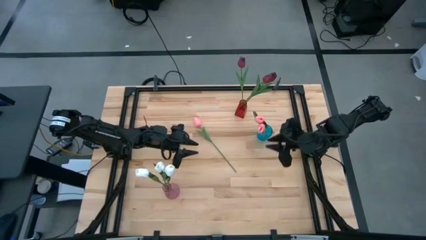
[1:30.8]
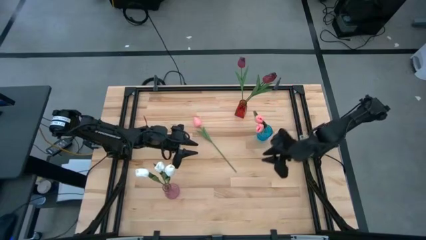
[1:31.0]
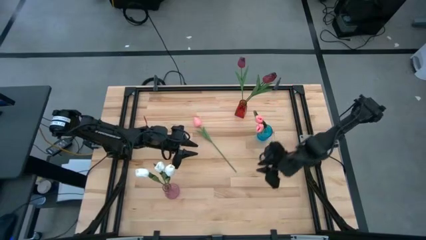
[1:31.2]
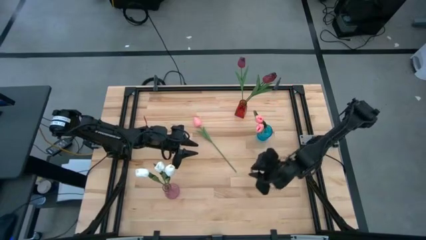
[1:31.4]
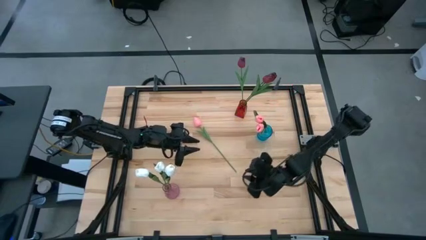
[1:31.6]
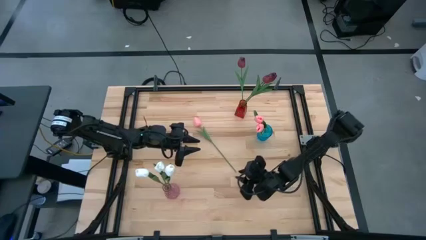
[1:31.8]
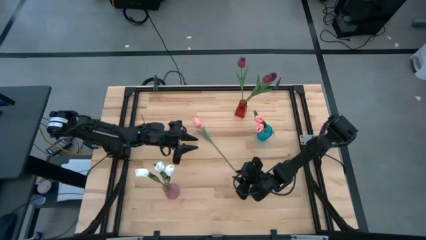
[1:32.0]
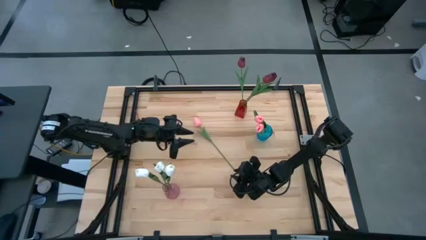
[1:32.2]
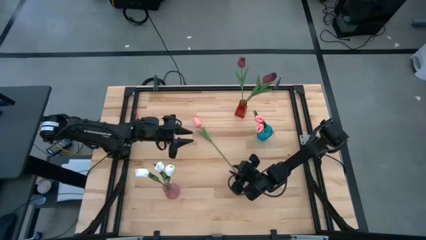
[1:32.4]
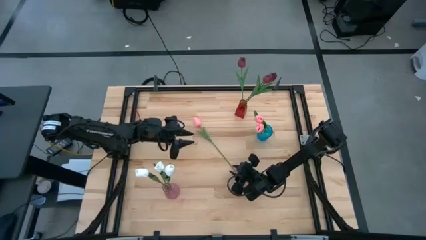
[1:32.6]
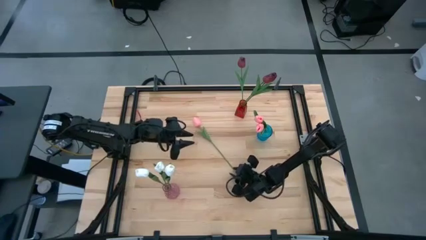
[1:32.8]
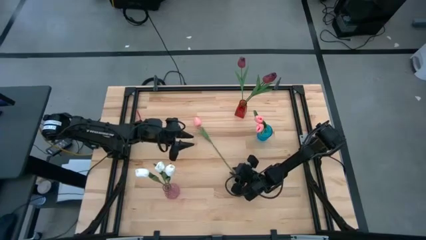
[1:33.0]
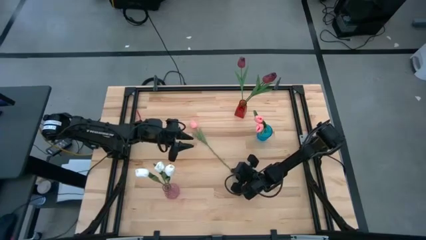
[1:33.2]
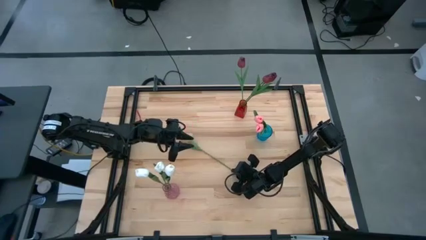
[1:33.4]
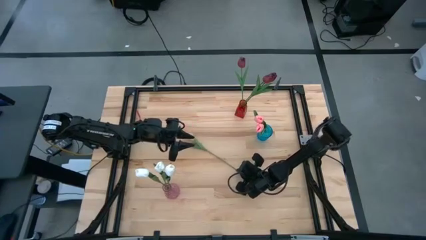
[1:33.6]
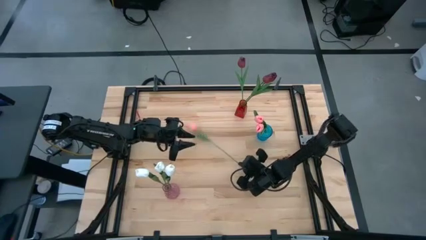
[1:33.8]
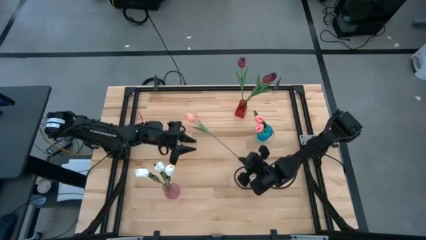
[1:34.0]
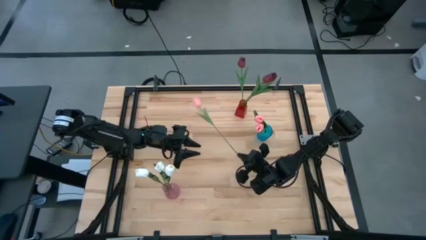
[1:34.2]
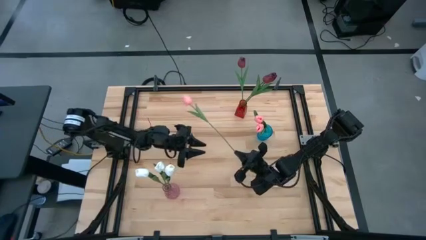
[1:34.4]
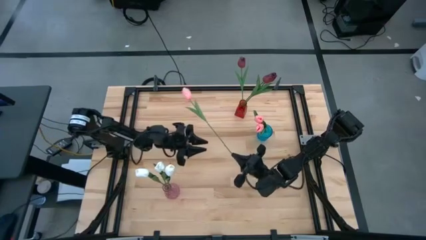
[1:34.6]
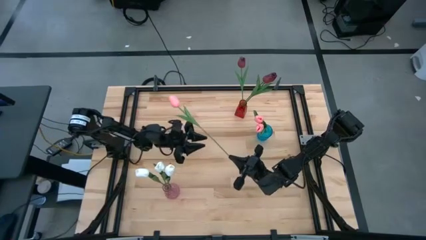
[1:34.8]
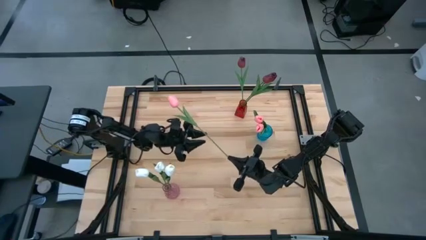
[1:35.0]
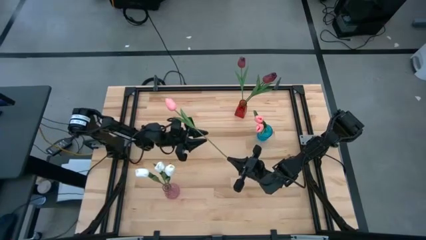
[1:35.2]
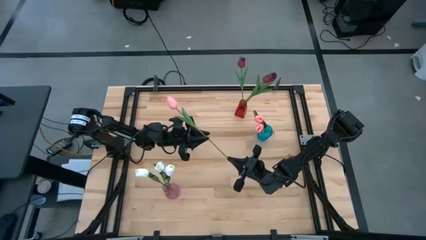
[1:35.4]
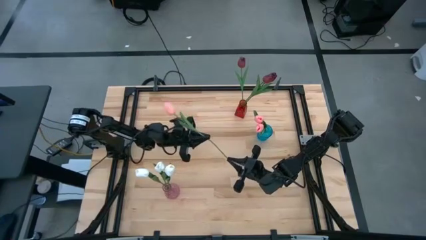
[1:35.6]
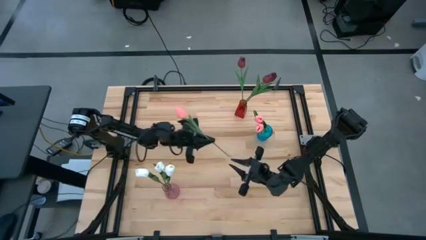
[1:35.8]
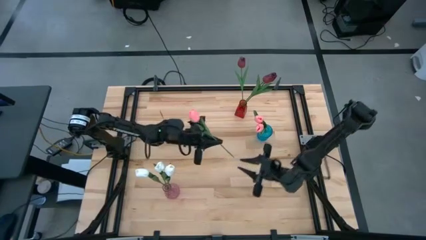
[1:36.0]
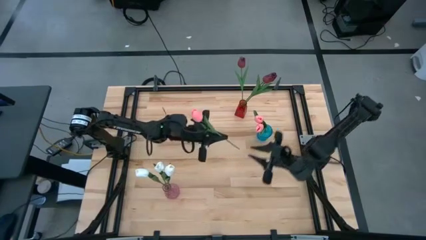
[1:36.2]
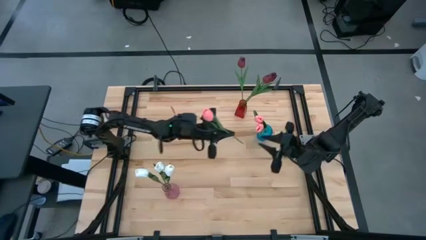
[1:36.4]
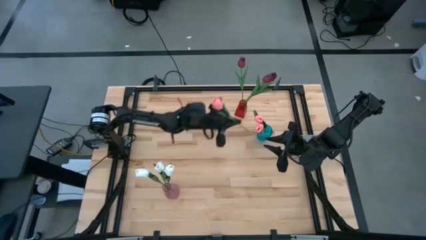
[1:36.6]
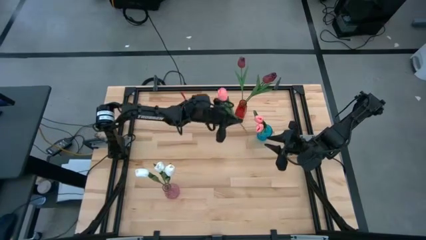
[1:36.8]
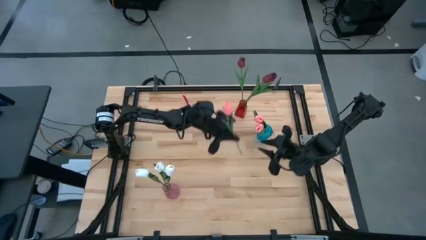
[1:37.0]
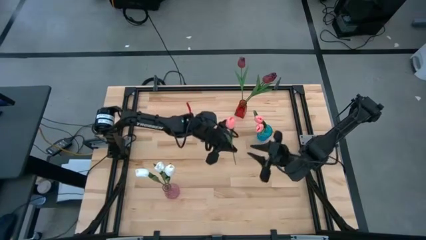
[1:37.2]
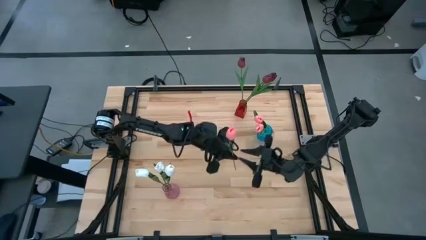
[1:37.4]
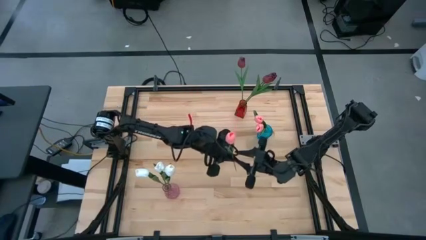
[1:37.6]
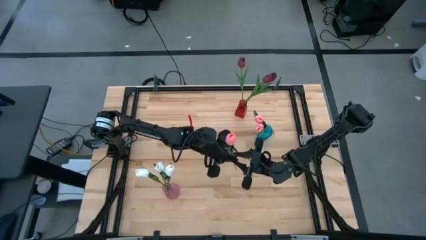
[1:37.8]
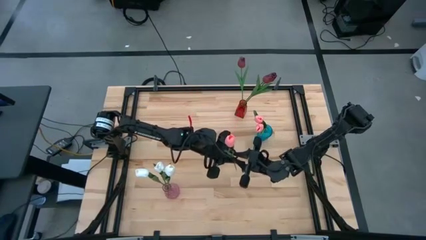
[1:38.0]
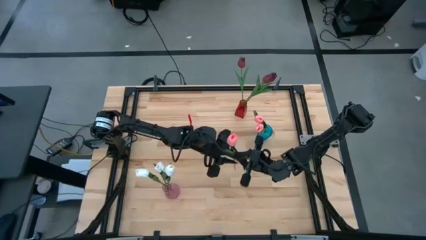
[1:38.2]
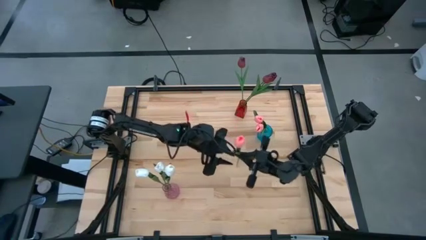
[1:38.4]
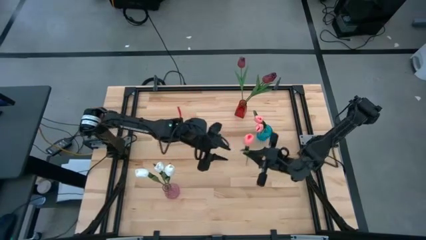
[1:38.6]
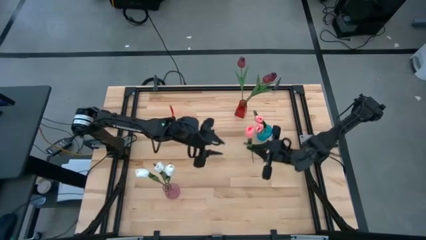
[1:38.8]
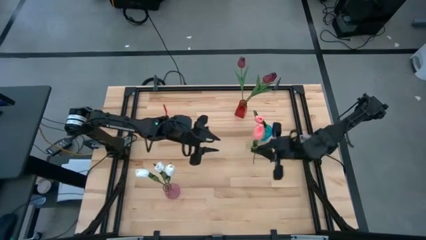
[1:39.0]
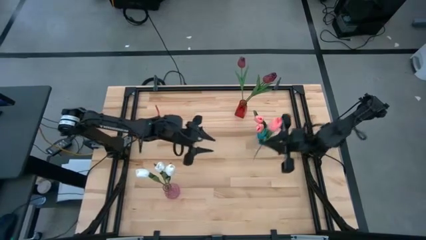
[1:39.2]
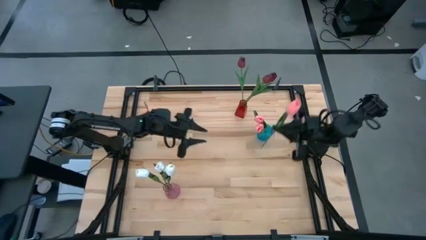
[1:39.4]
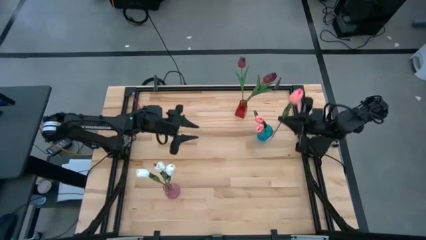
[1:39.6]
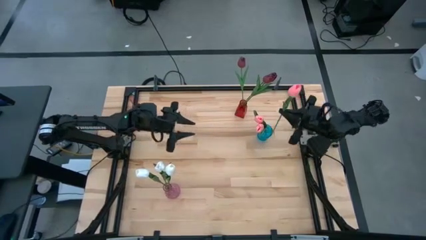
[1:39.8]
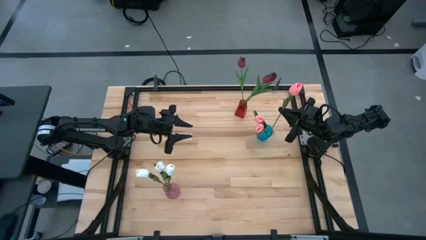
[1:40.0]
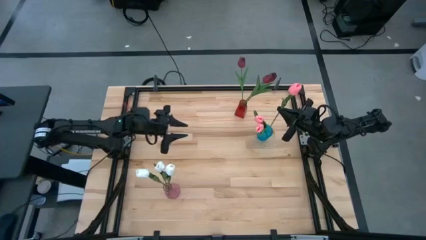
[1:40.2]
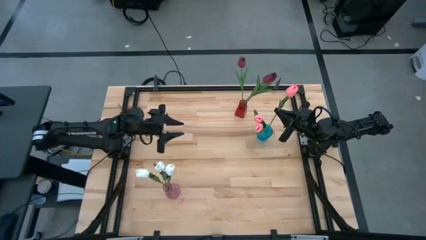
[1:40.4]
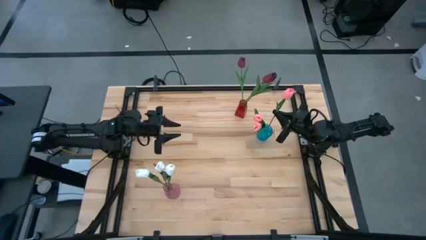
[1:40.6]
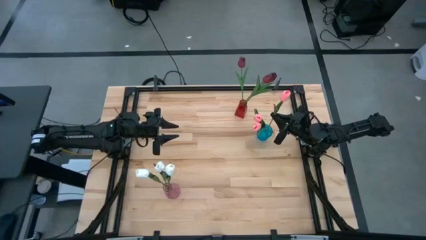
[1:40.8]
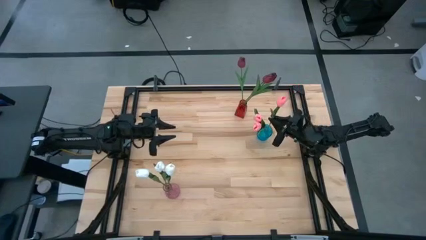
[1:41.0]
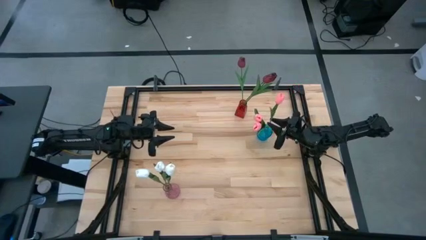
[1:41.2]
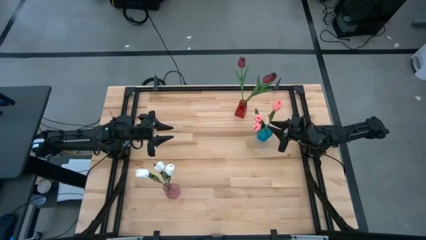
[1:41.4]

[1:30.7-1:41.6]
Task: Sort flowers into vase by color
Put the pink flower into the blue glass vase

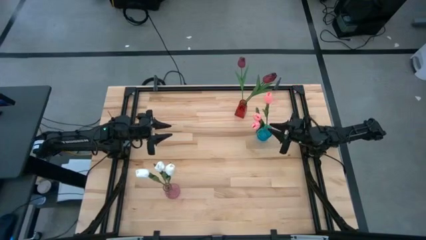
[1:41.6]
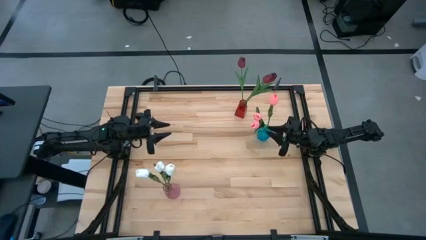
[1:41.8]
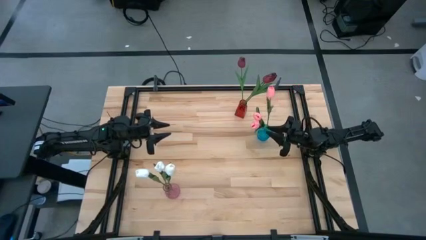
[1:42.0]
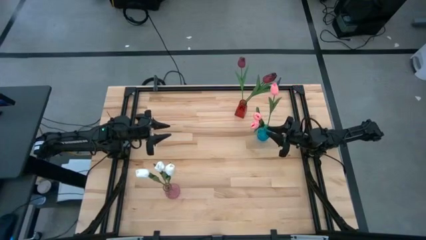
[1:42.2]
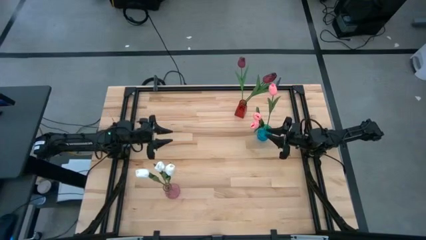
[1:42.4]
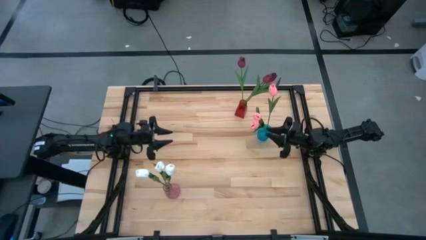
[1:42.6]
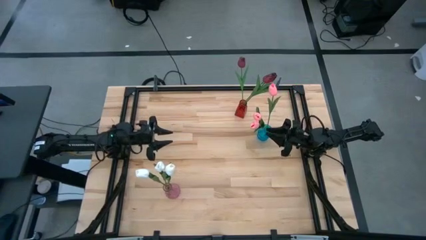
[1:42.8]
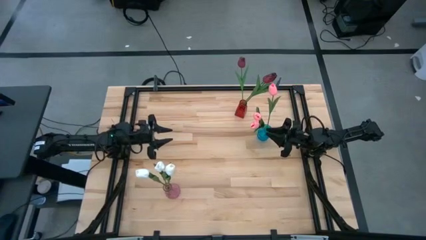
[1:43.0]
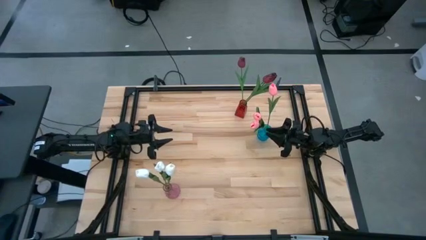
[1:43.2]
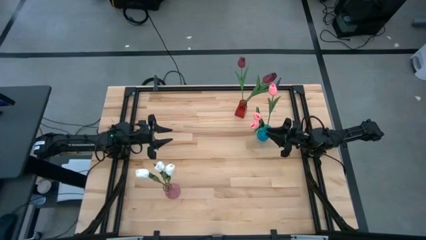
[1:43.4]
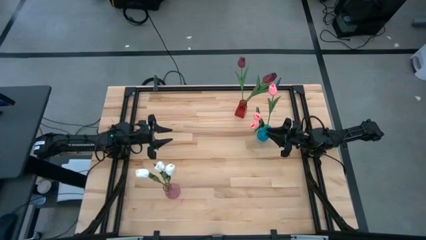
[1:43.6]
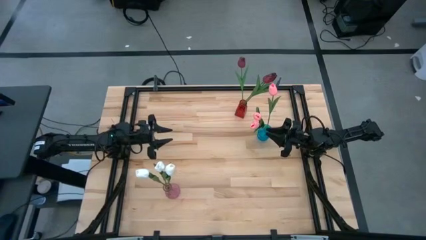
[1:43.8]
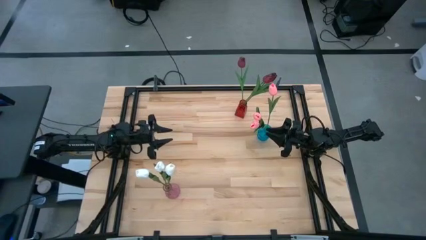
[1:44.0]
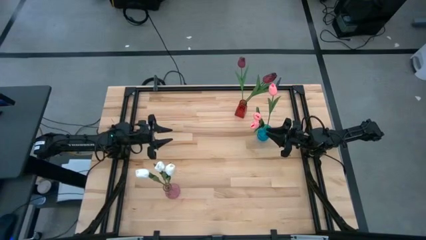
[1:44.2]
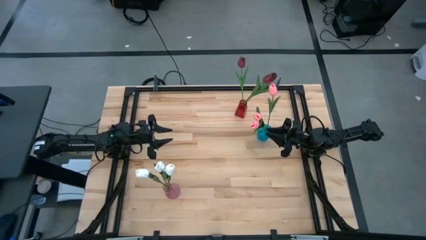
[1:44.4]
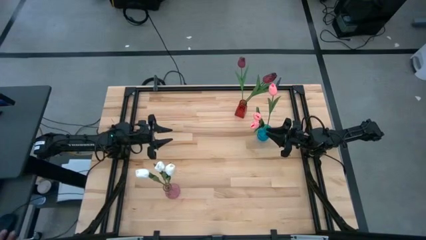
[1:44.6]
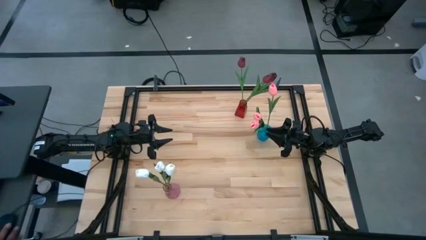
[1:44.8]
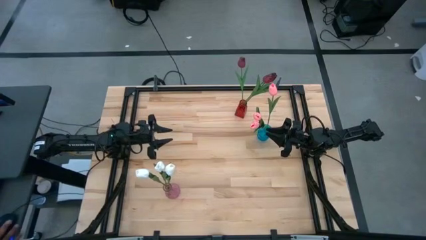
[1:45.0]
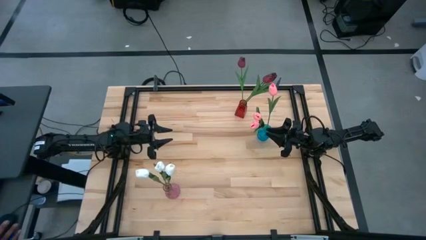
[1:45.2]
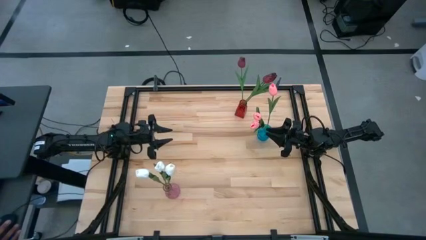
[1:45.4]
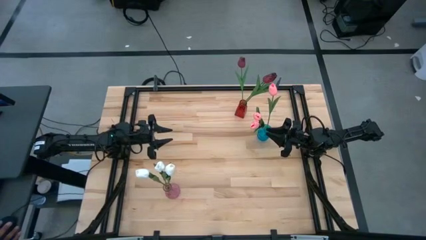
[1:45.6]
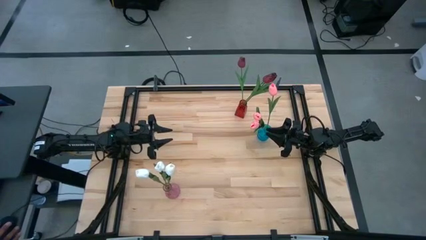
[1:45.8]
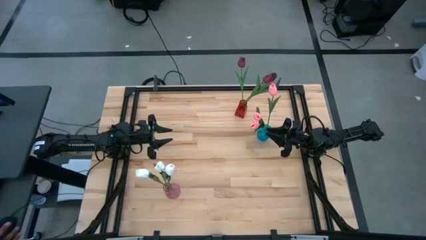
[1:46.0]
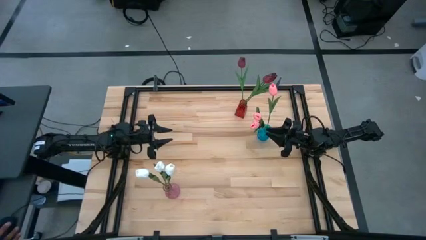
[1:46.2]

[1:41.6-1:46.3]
Return to Home Position
